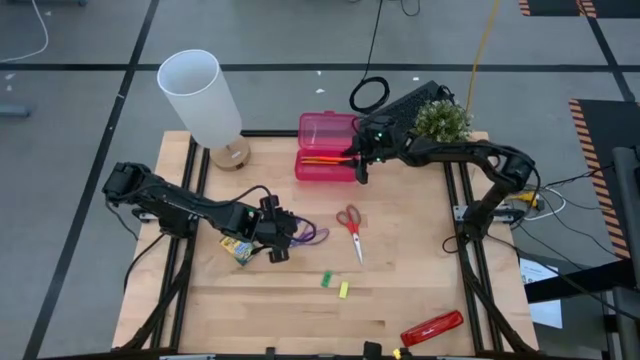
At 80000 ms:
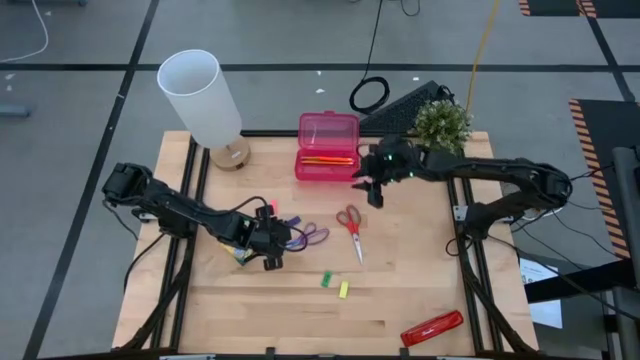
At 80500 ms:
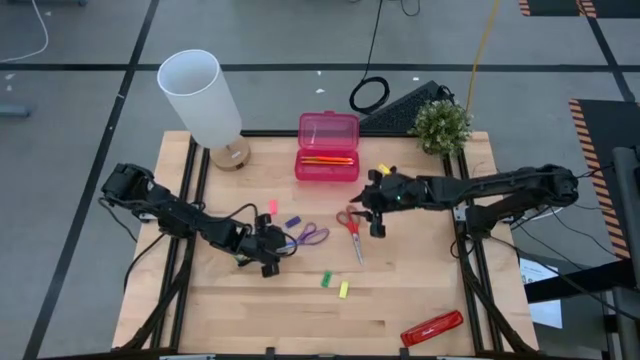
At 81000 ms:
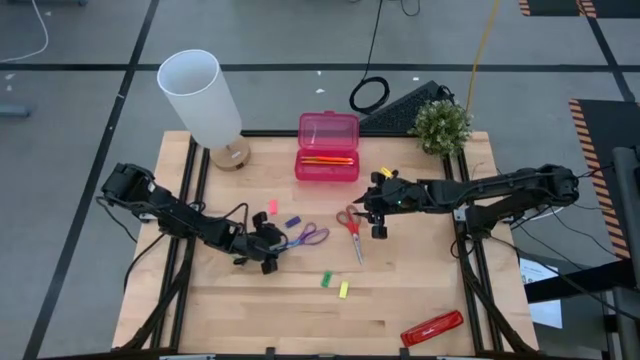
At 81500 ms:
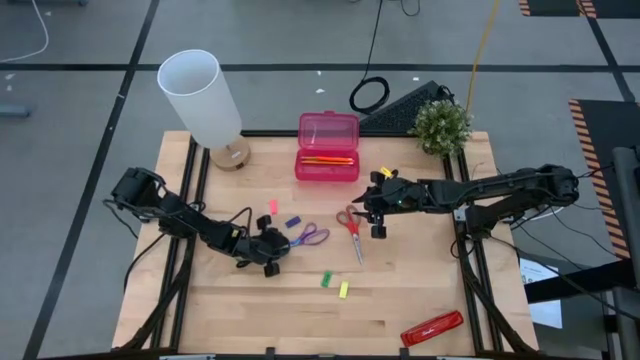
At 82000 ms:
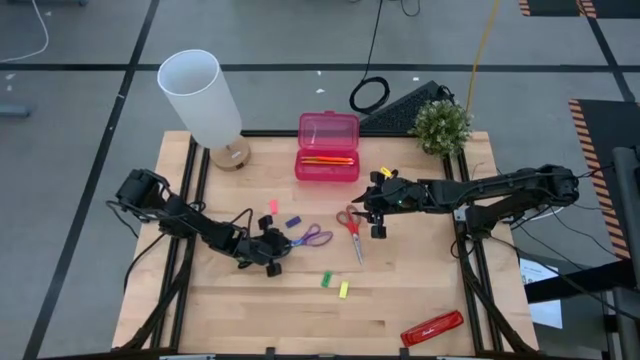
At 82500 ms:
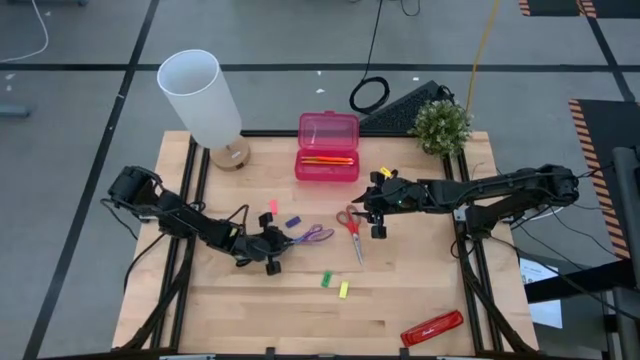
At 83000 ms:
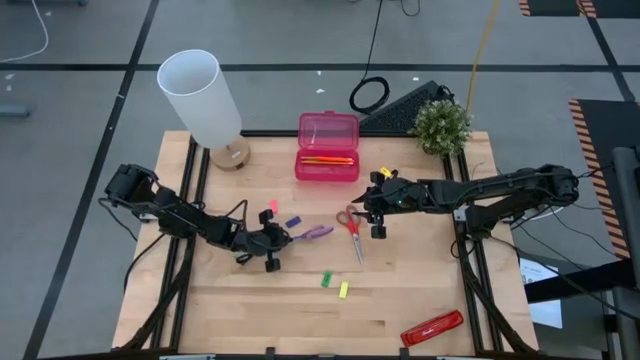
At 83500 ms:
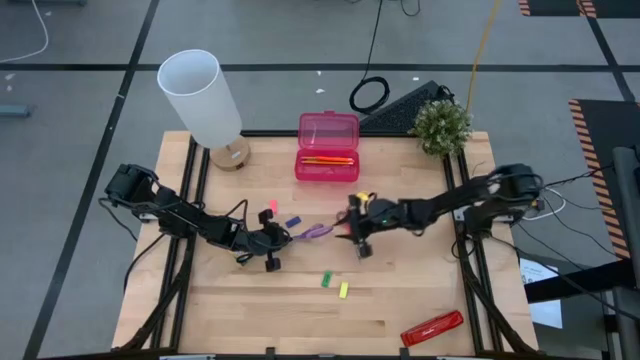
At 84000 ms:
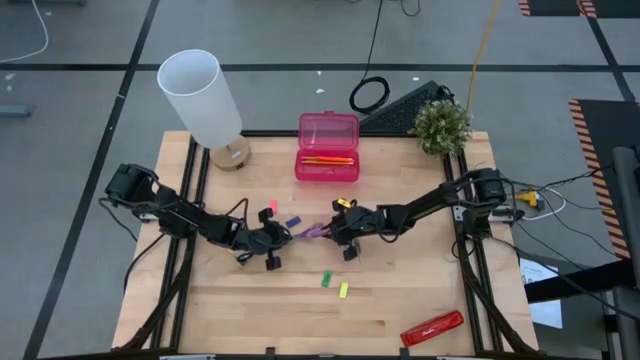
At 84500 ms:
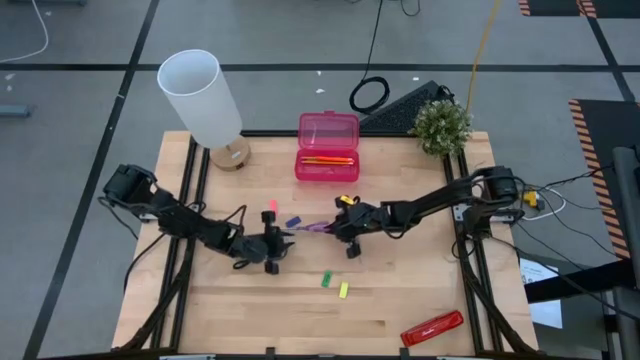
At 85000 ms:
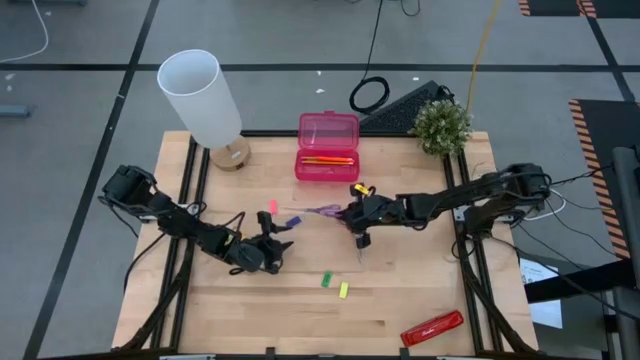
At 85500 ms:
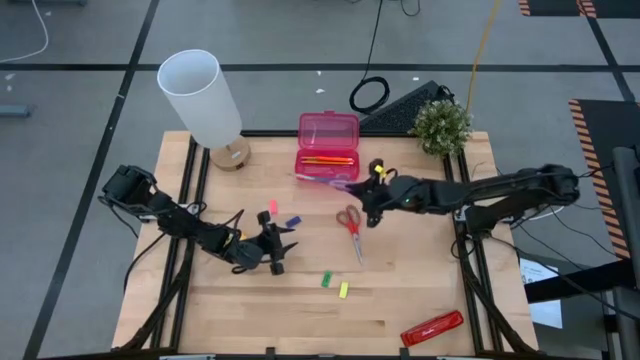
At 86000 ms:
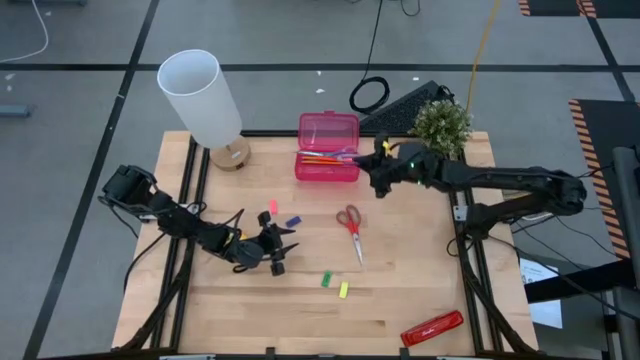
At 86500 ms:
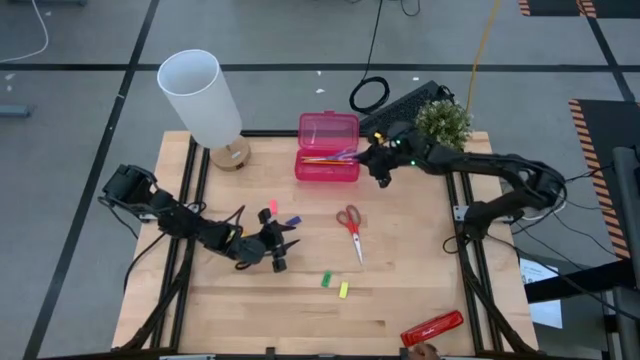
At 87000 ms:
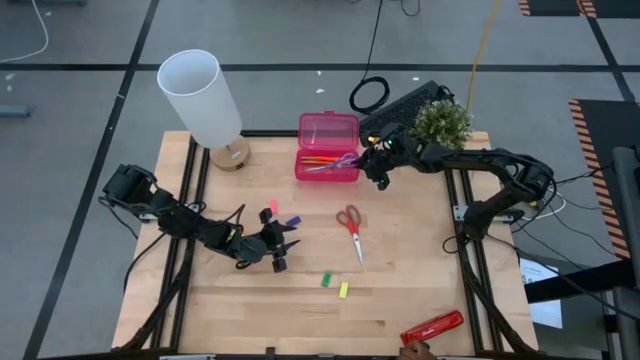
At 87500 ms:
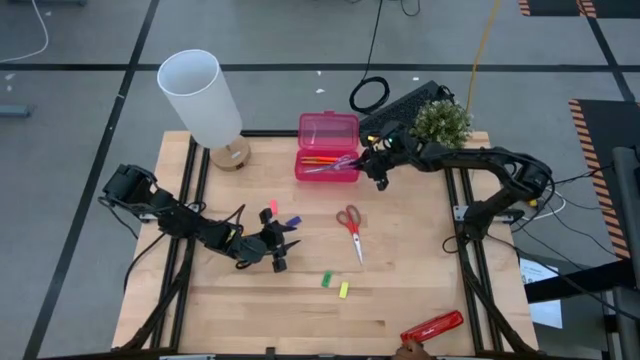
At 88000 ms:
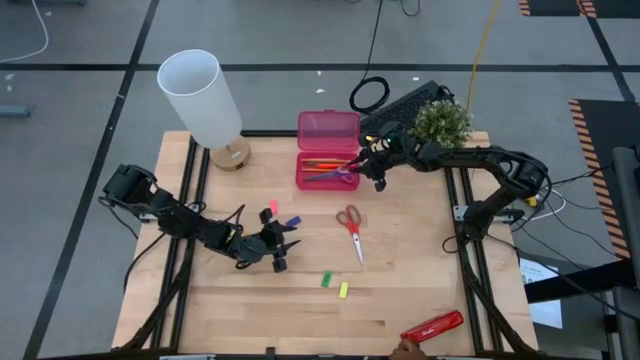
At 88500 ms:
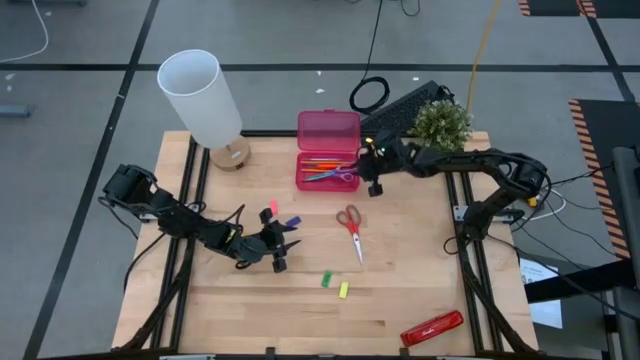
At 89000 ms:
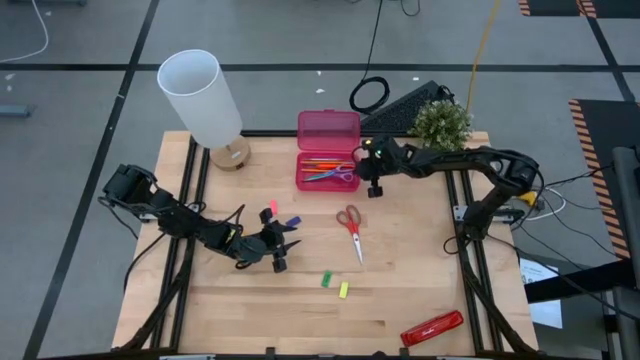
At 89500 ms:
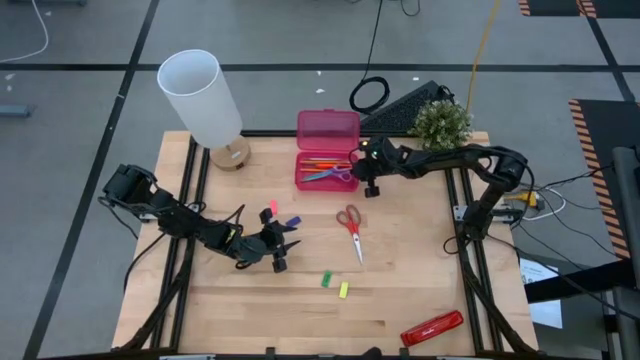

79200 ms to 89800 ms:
Task: Pack school essentials
Put the purple scissors into the red supply box

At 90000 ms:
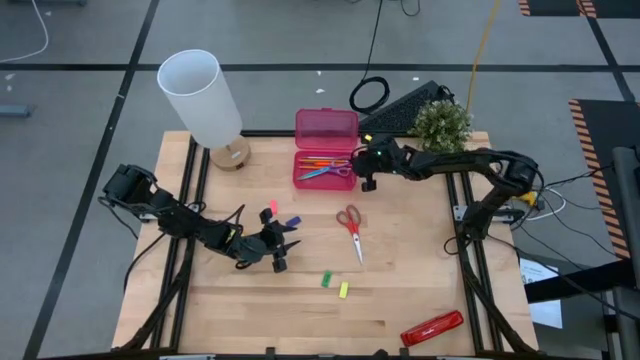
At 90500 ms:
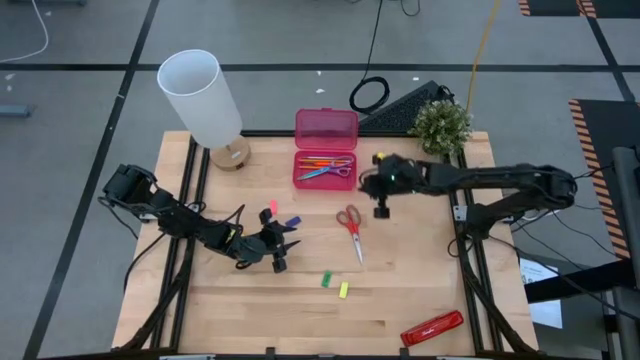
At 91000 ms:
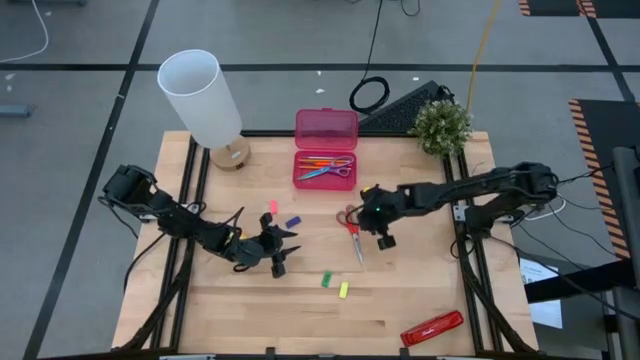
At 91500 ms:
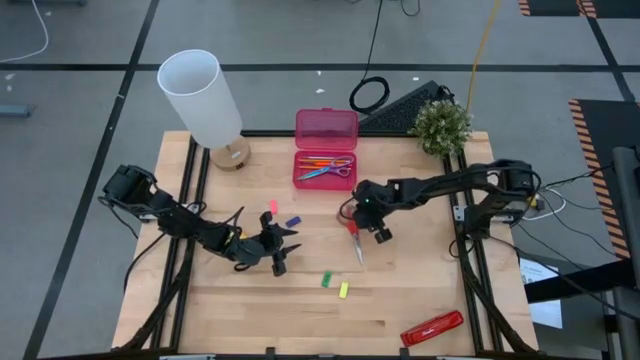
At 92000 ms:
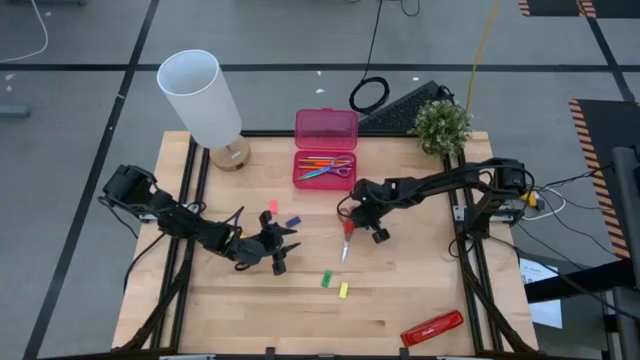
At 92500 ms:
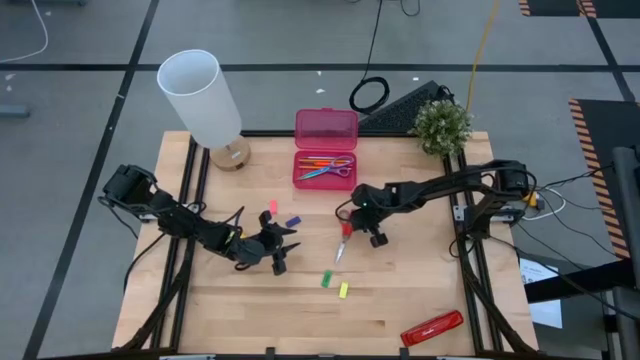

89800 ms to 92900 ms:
Put the red scissors into the red supply box

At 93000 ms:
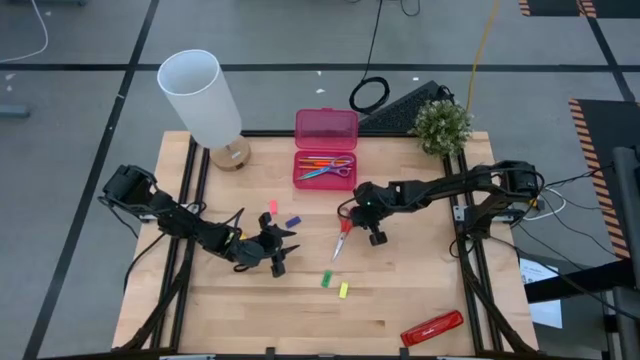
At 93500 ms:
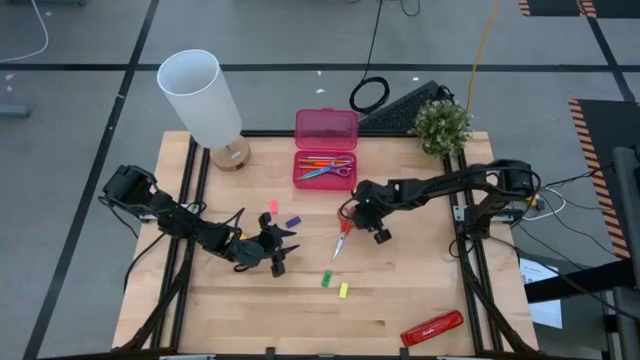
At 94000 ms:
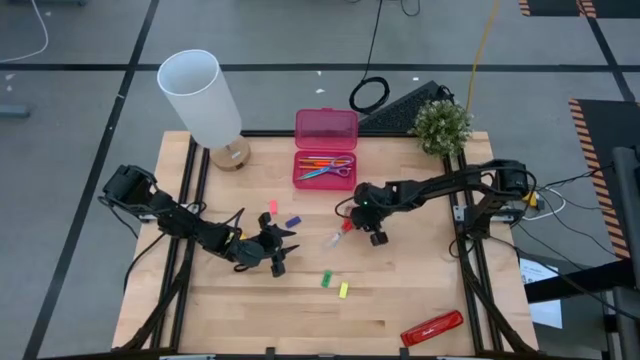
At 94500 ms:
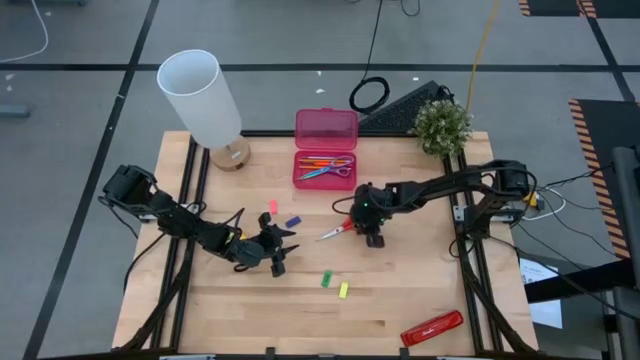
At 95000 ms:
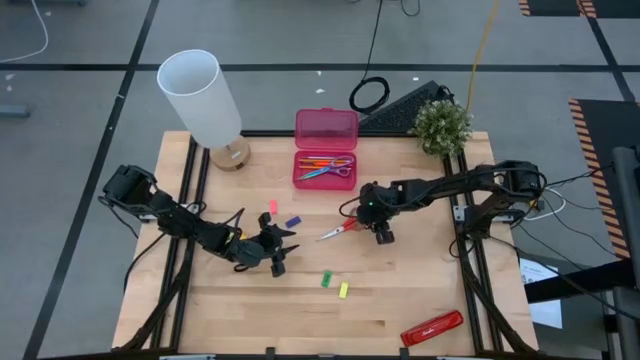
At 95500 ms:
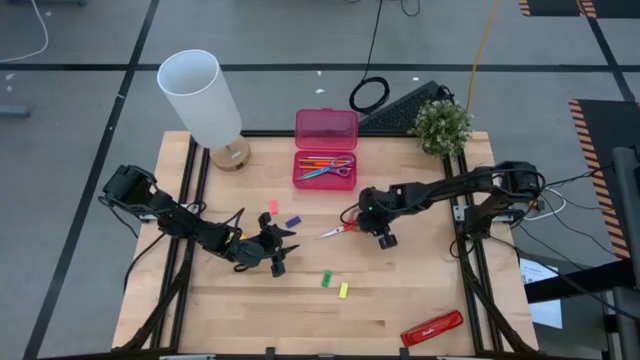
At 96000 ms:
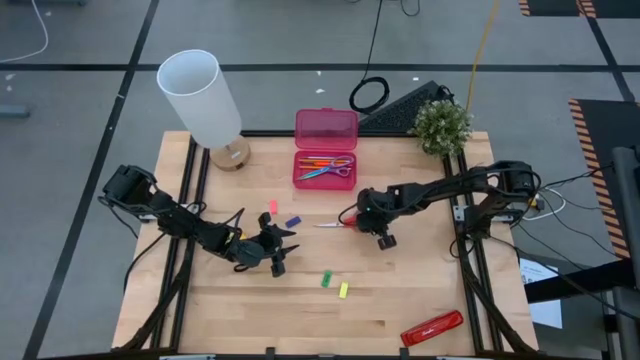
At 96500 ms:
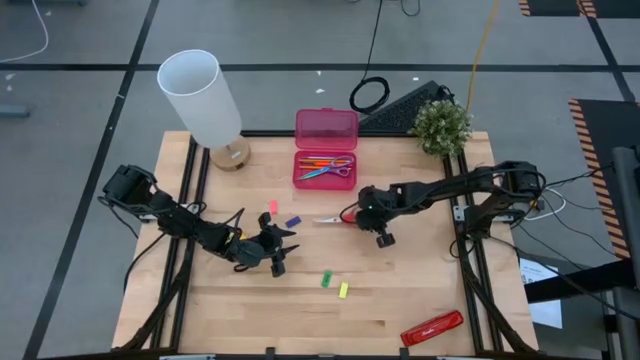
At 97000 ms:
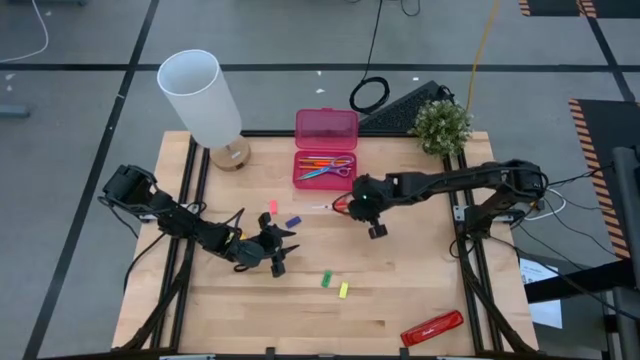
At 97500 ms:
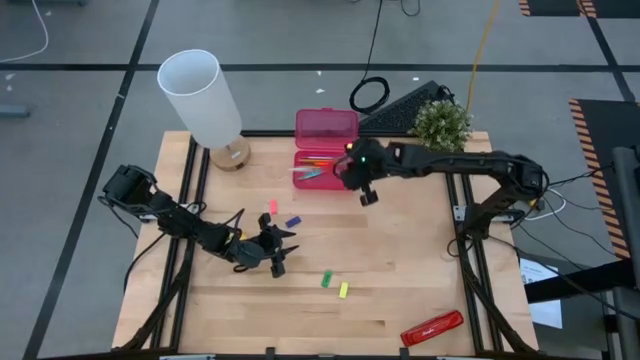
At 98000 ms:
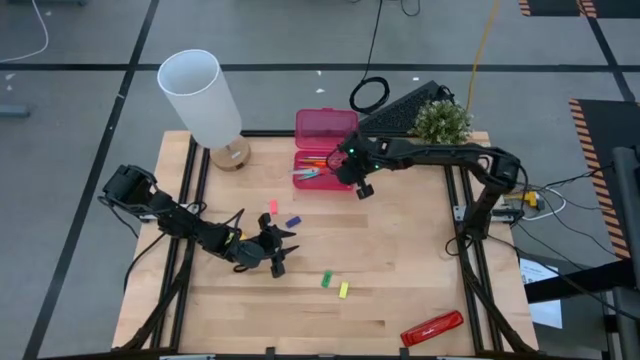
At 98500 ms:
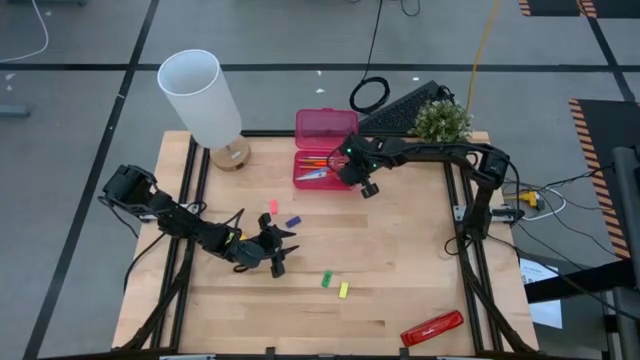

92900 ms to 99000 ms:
Put the red scissors into the red supply box

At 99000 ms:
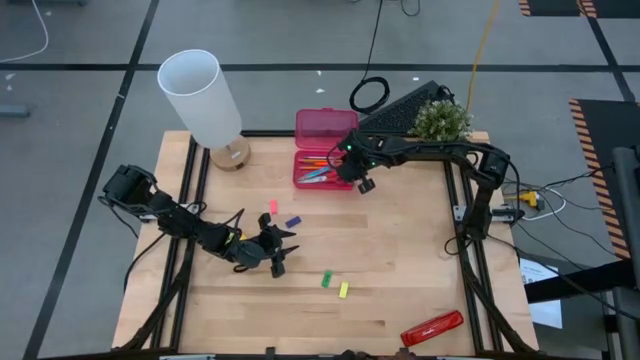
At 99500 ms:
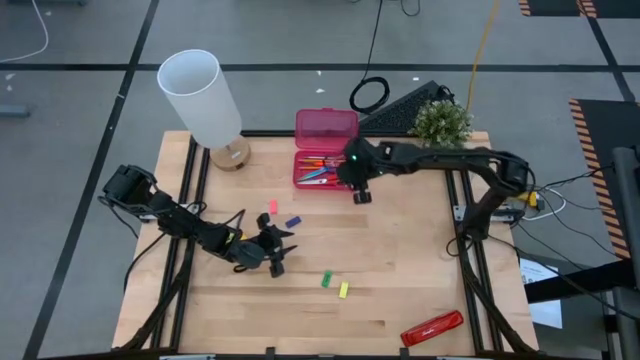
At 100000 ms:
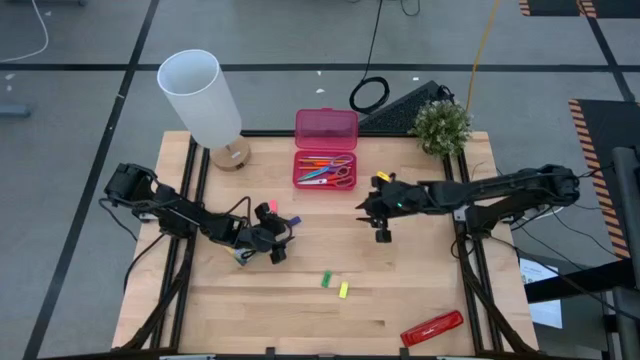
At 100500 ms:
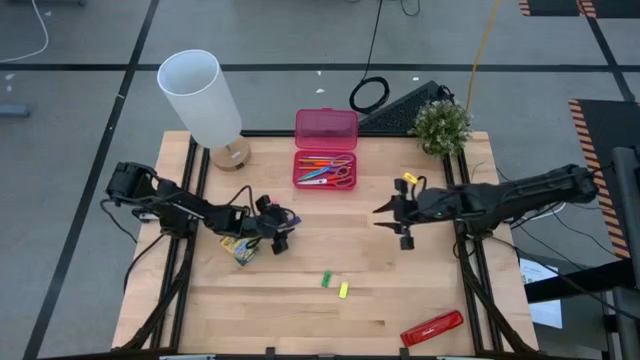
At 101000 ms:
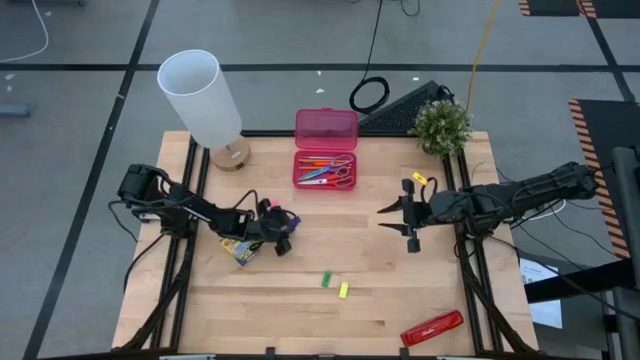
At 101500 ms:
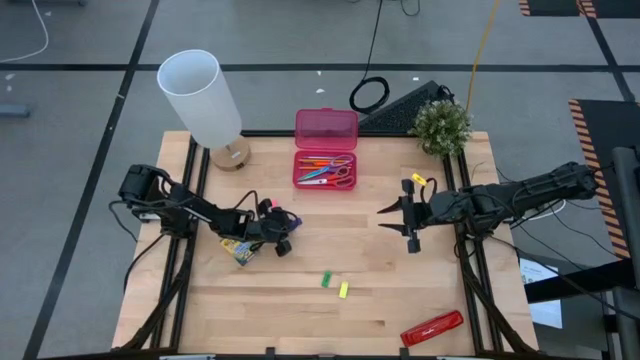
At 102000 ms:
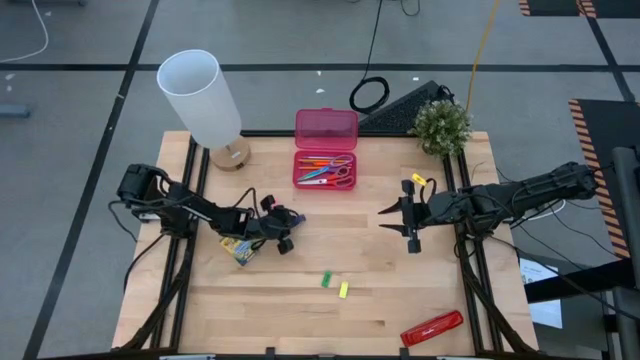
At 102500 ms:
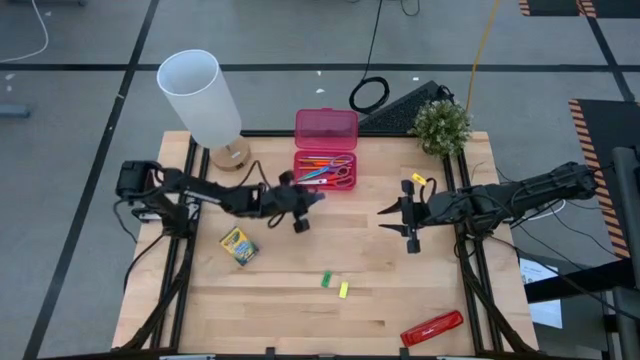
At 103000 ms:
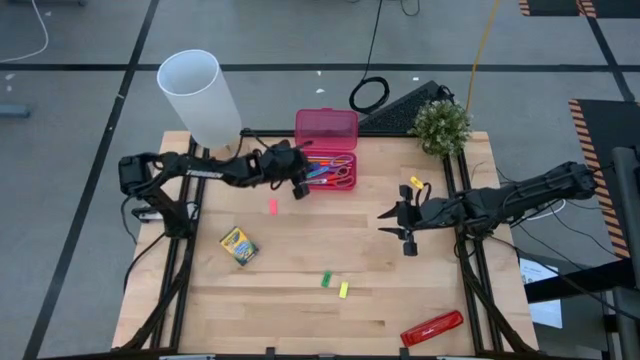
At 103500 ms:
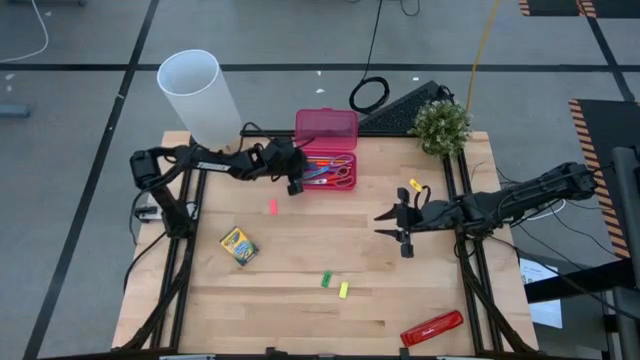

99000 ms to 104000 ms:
Put the blue eraser into the red supply box
